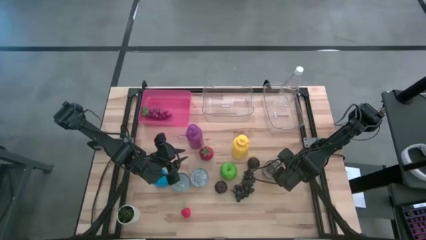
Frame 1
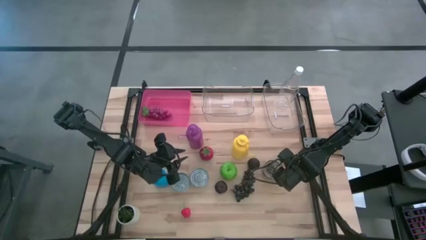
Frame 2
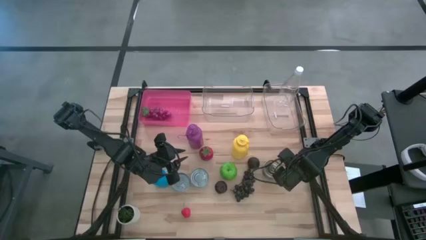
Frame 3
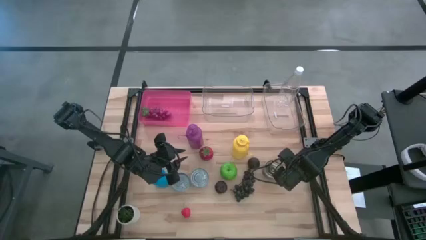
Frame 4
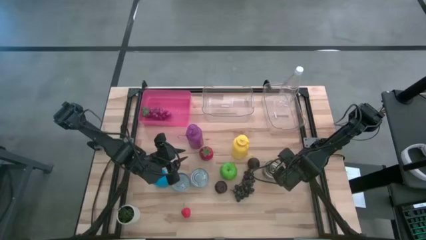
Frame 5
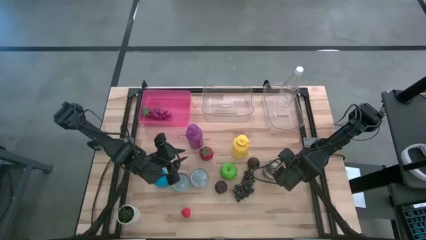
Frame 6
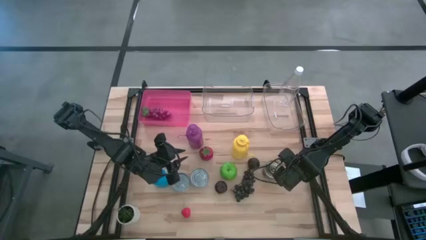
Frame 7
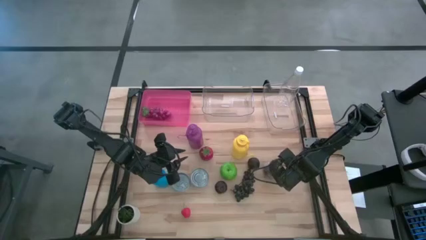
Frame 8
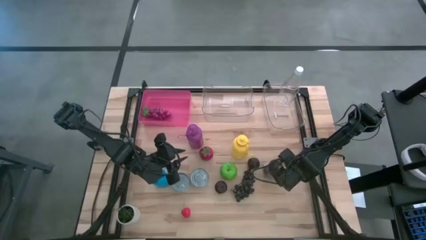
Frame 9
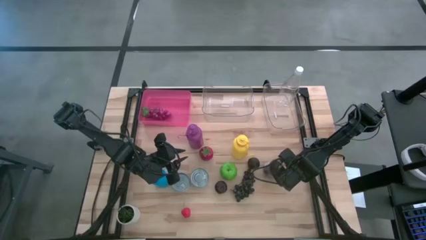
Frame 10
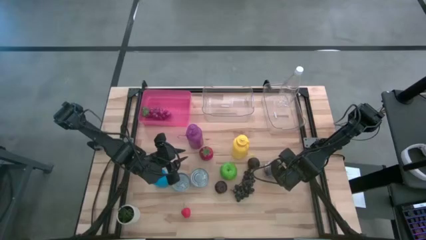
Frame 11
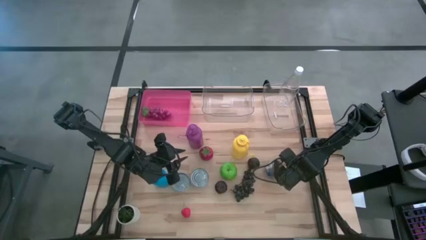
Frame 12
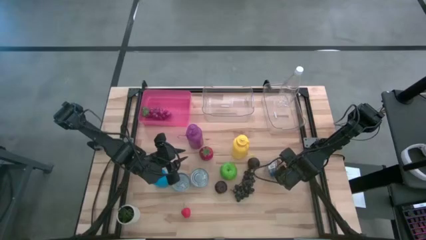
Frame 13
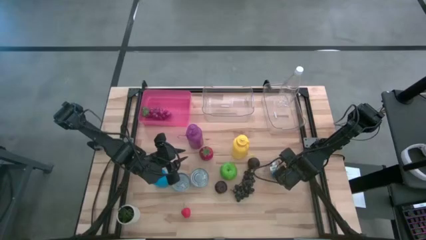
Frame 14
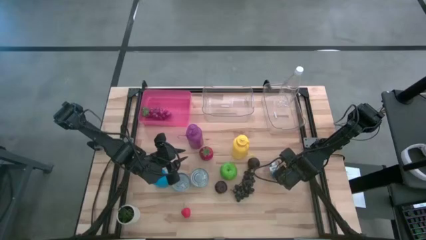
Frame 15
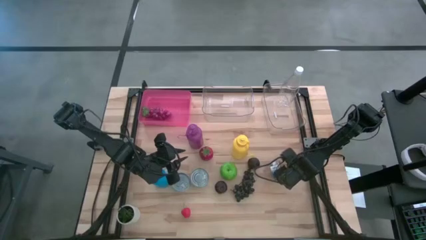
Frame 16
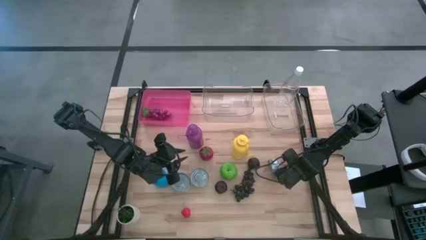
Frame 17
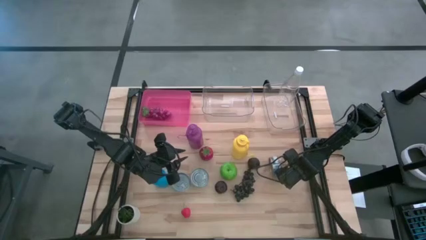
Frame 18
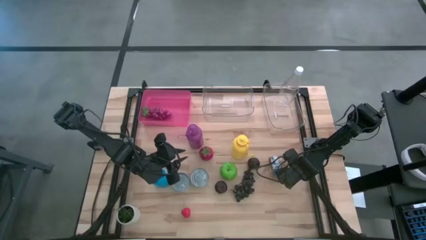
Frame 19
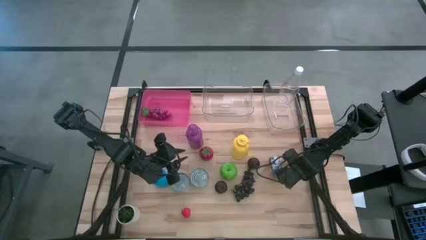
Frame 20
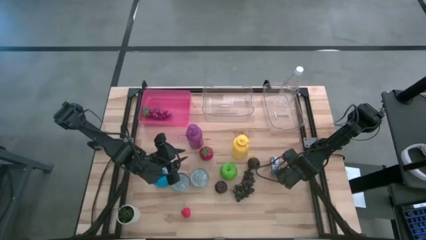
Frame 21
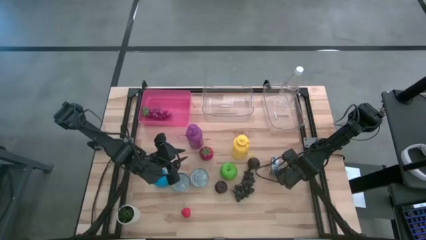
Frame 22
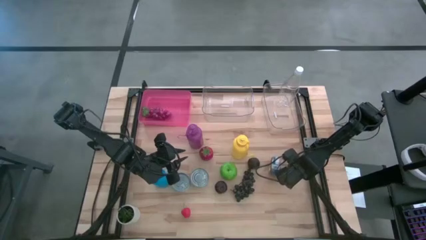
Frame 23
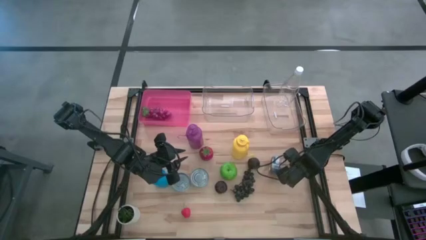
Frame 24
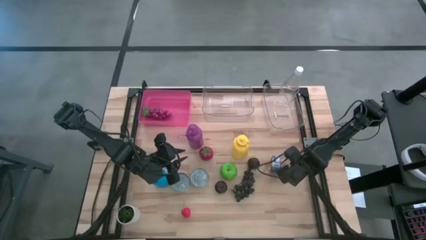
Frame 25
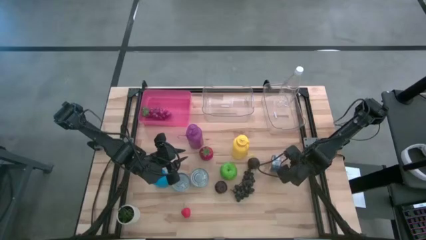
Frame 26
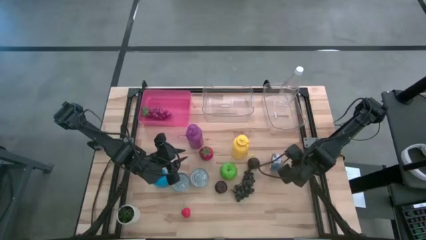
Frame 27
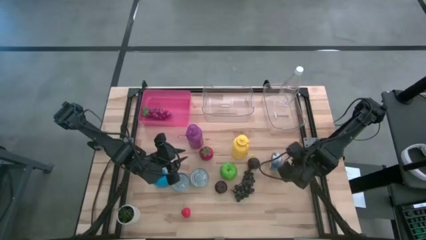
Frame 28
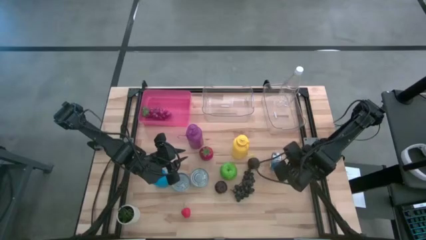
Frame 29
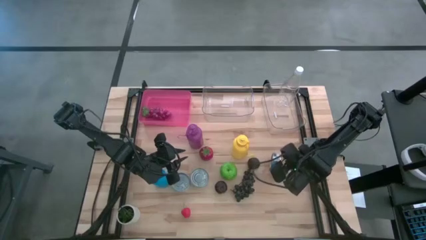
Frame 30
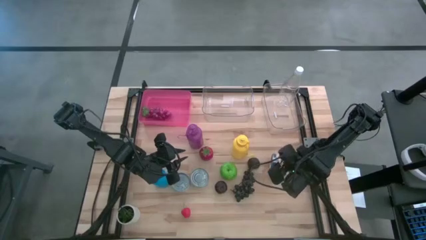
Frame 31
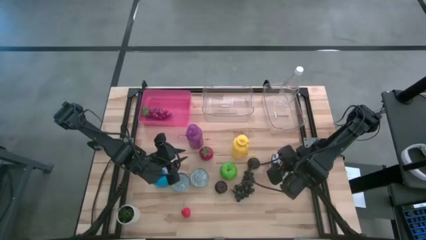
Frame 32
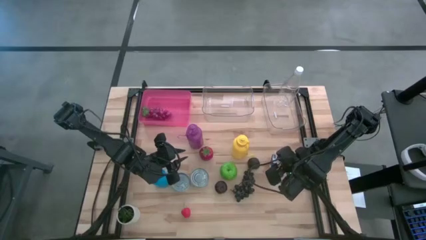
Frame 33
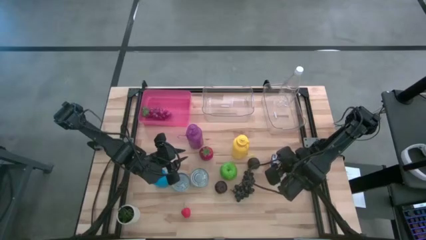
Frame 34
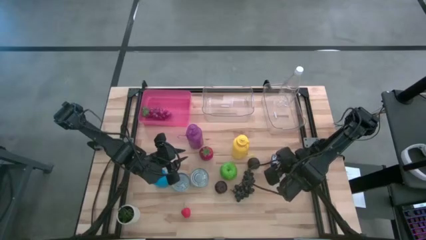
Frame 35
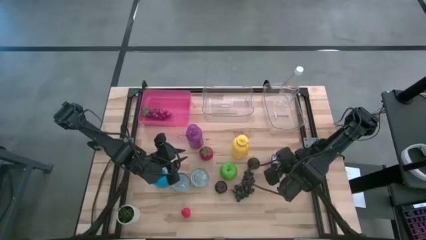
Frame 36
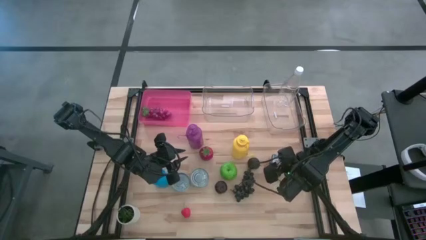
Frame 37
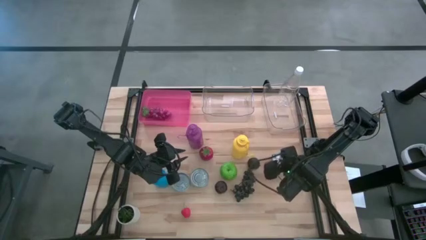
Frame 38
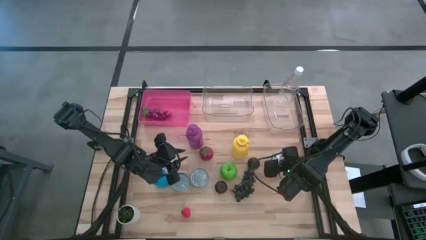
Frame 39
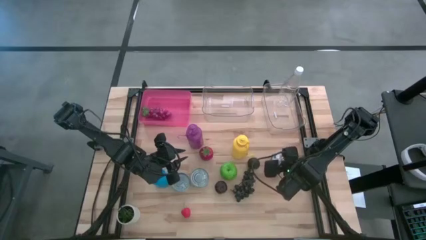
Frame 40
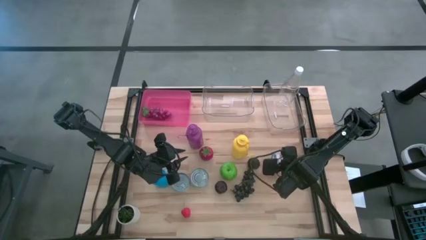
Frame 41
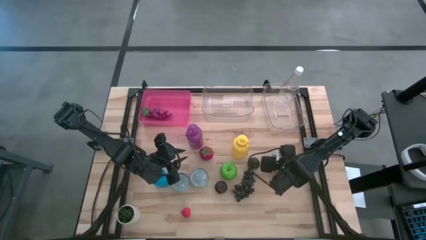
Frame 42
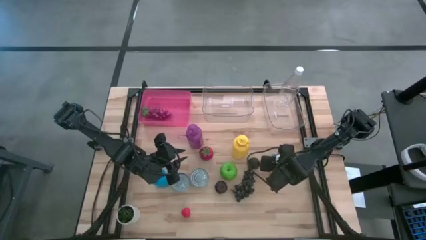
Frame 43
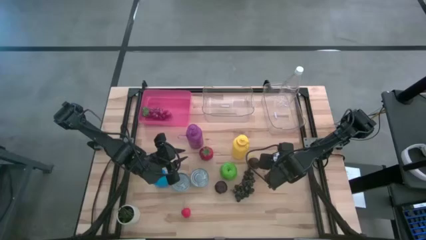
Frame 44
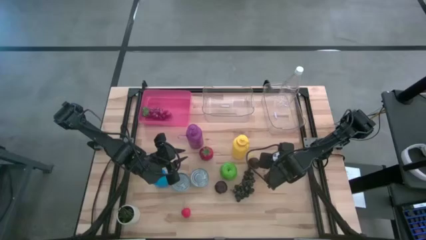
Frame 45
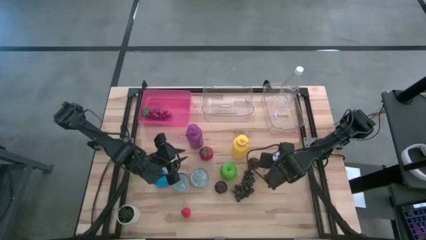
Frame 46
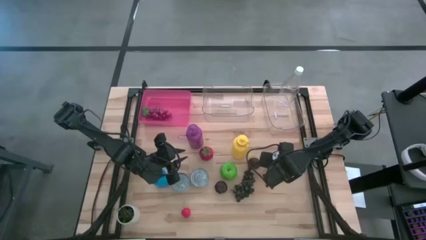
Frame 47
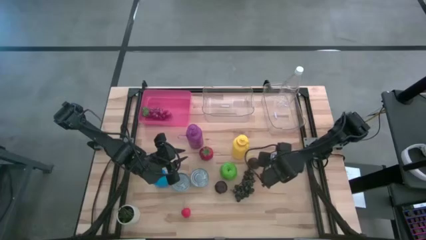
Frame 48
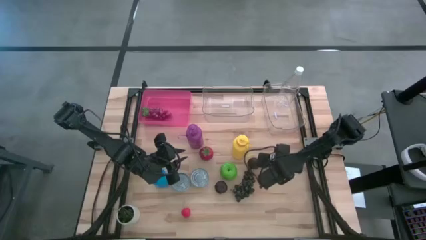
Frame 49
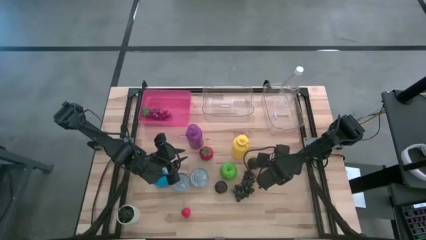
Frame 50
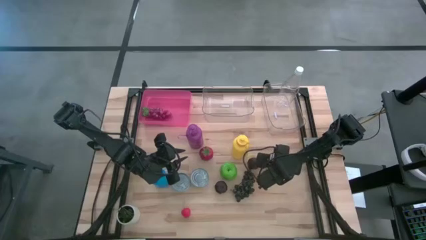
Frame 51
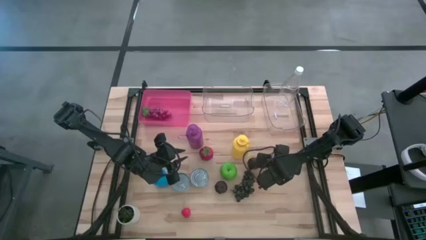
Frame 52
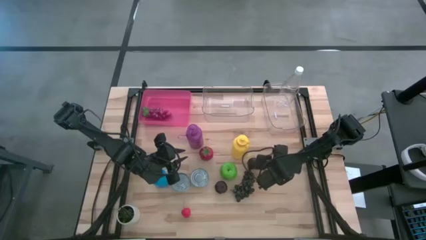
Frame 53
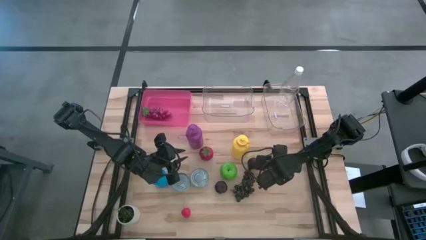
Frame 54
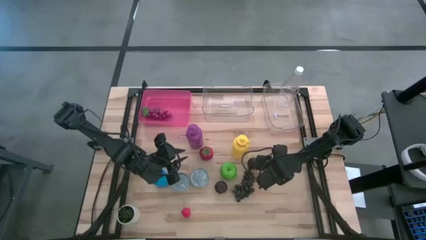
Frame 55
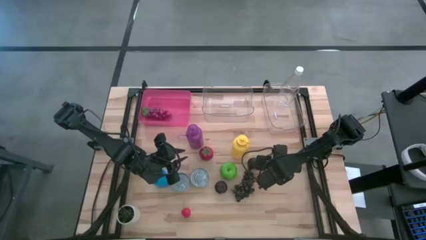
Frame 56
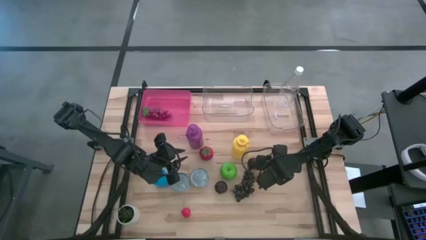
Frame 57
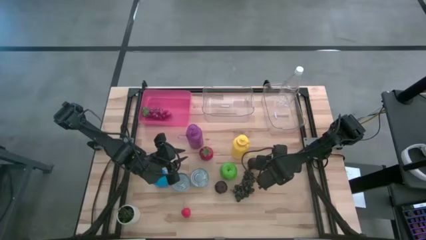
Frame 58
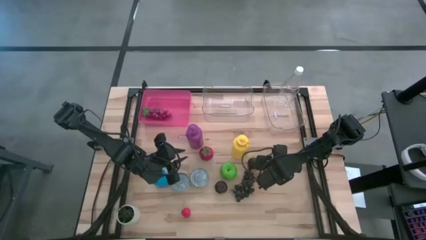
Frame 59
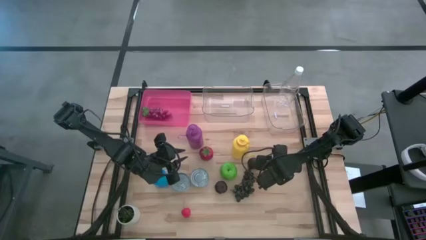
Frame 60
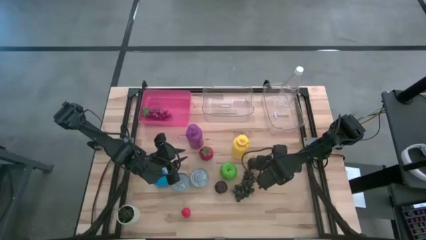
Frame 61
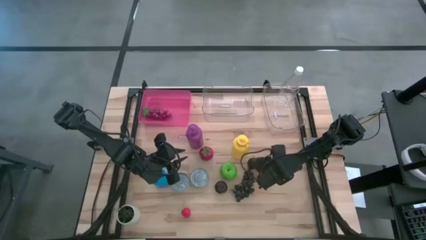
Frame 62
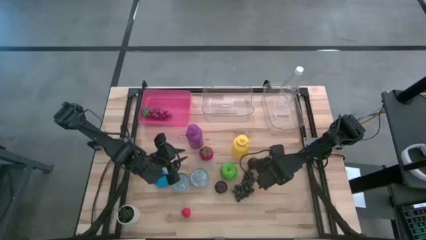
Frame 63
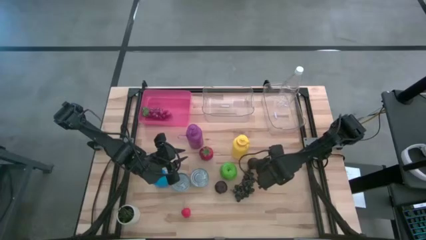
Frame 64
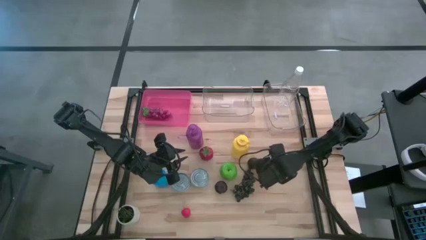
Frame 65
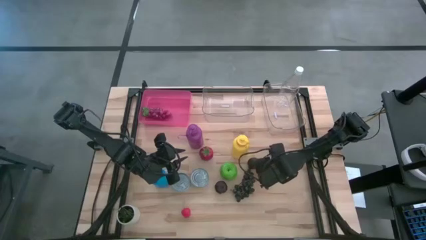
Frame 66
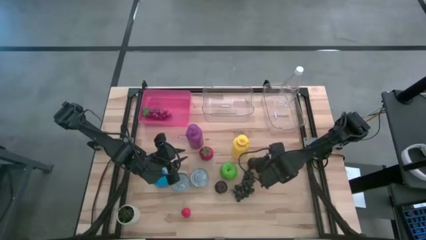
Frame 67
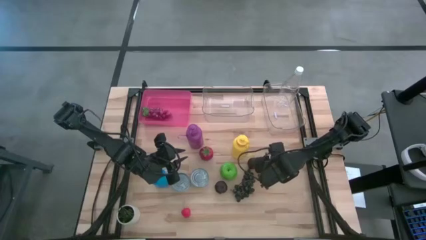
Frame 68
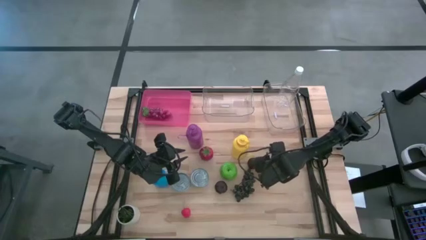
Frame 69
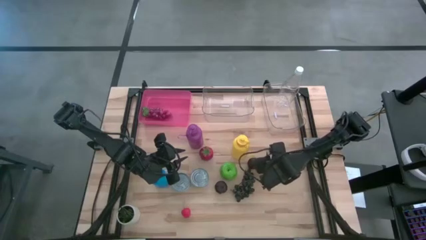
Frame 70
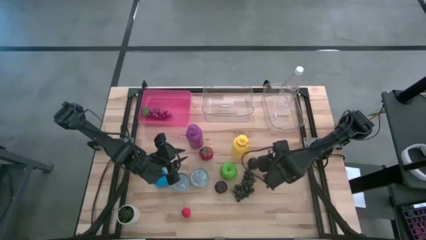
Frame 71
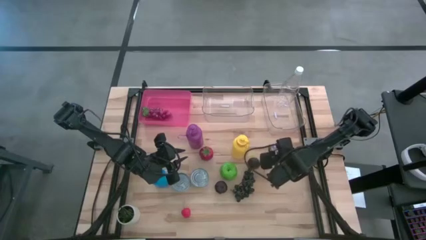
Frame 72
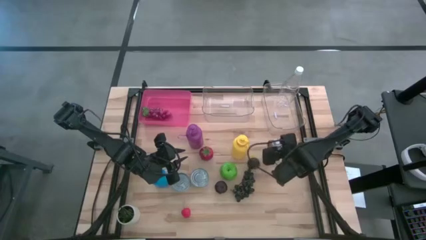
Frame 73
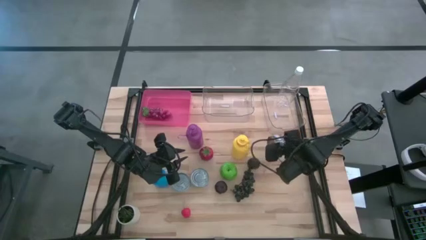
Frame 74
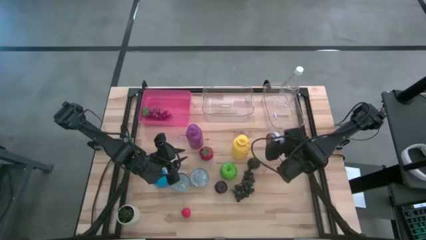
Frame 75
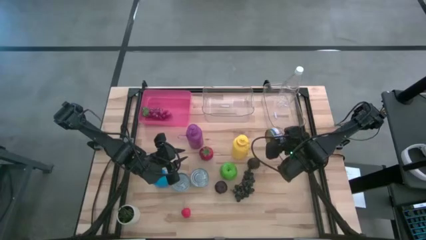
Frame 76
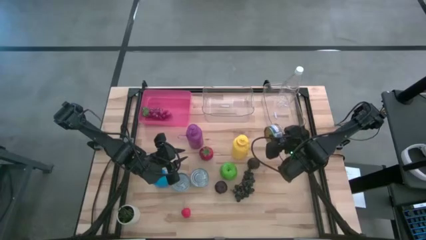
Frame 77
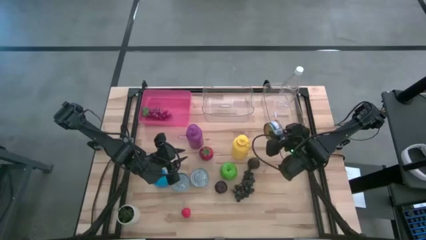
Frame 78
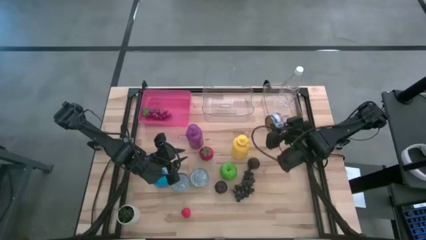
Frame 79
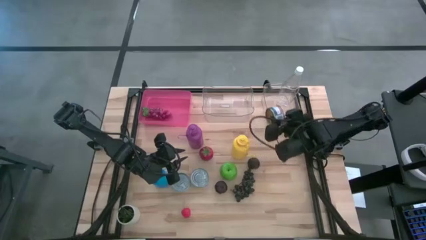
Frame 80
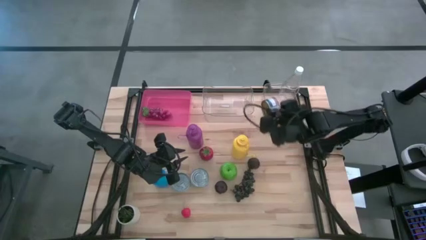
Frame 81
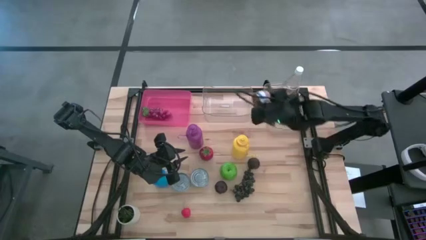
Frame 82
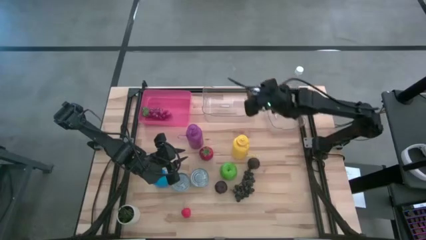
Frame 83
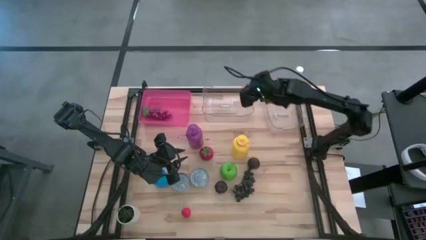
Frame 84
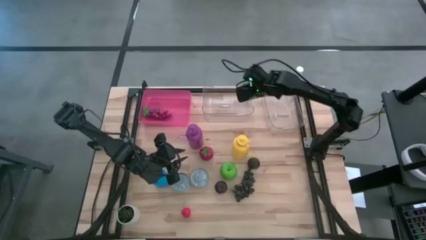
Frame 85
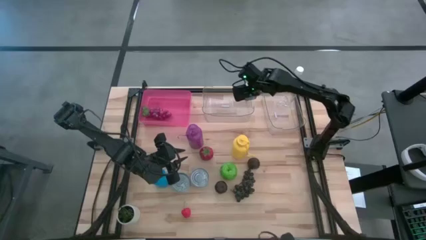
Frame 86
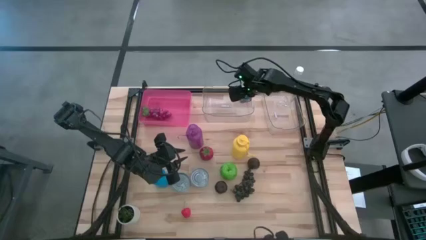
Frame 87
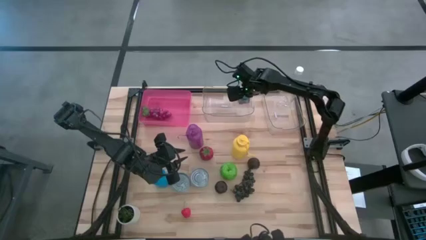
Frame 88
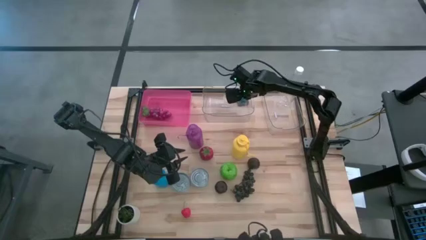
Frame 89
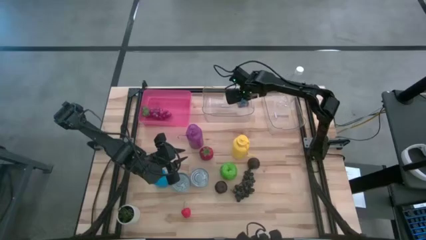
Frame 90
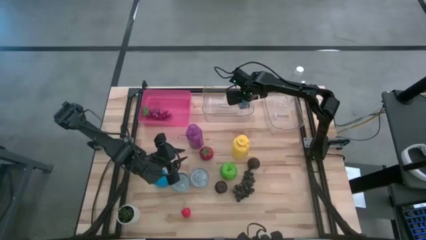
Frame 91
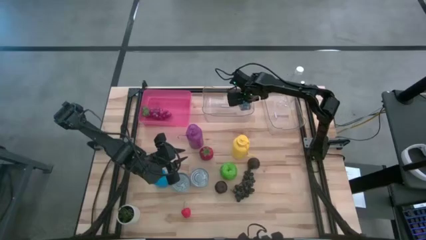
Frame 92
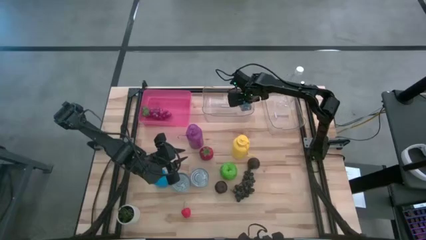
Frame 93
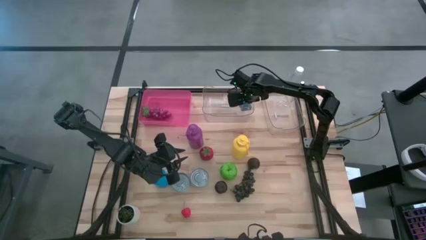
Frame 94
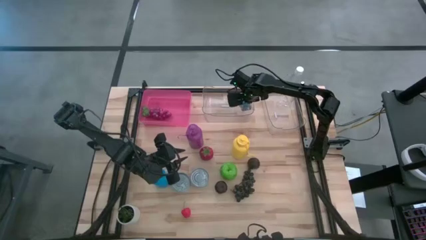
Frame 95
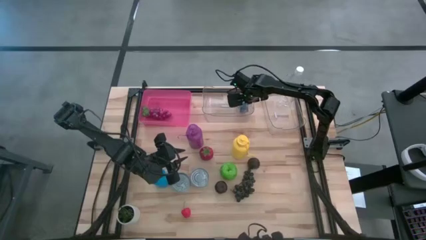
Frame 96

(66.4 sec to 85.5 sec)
Task: Pick & Place Food Item
Put the blue and pink tuna can into the left transparent bin
